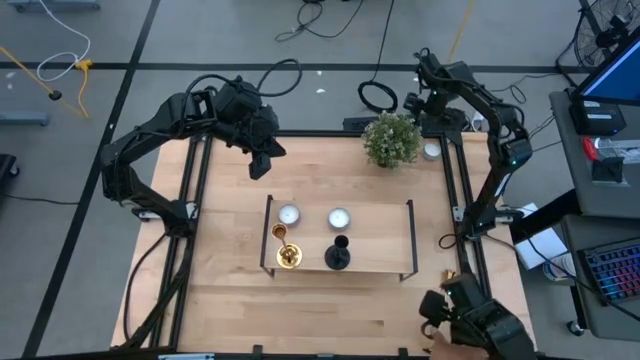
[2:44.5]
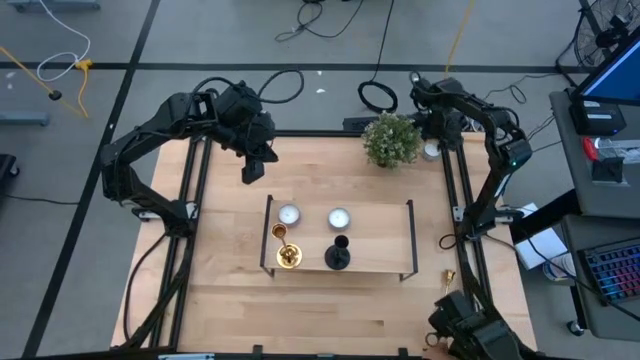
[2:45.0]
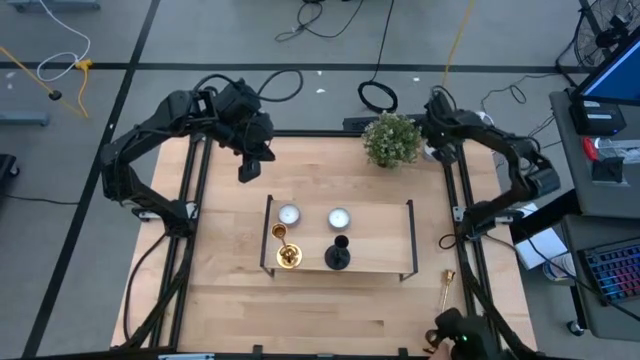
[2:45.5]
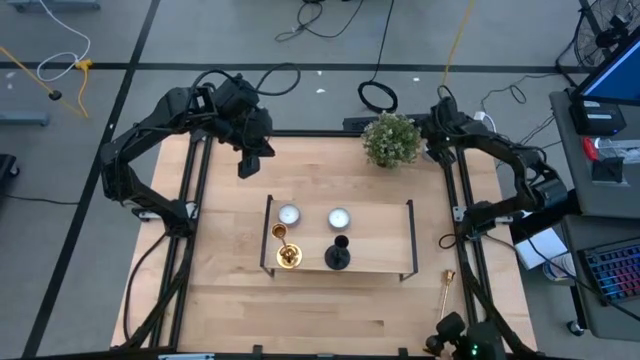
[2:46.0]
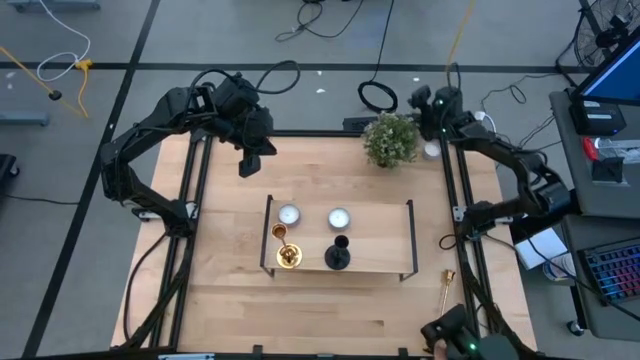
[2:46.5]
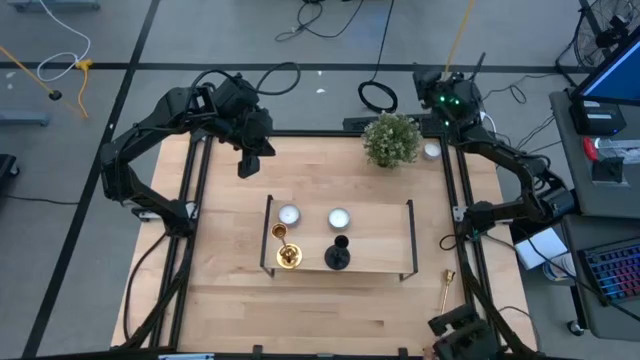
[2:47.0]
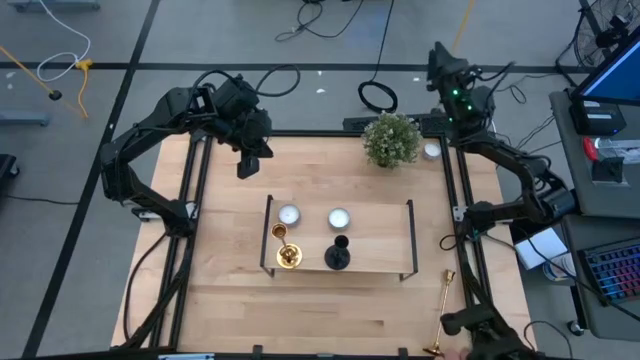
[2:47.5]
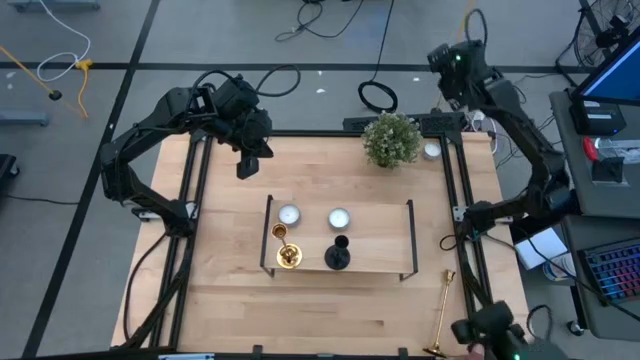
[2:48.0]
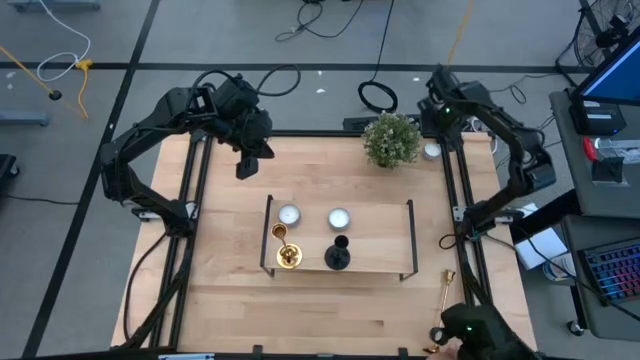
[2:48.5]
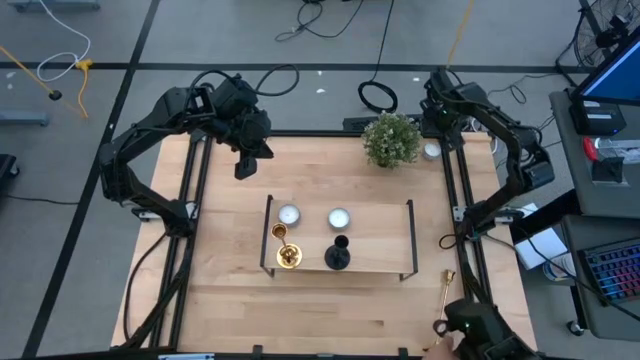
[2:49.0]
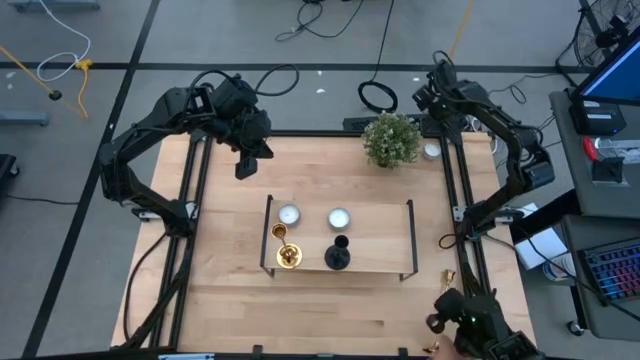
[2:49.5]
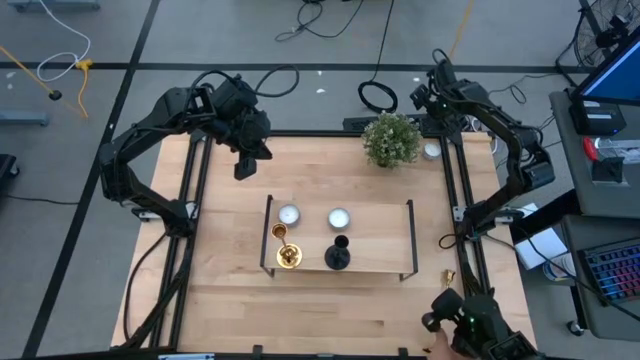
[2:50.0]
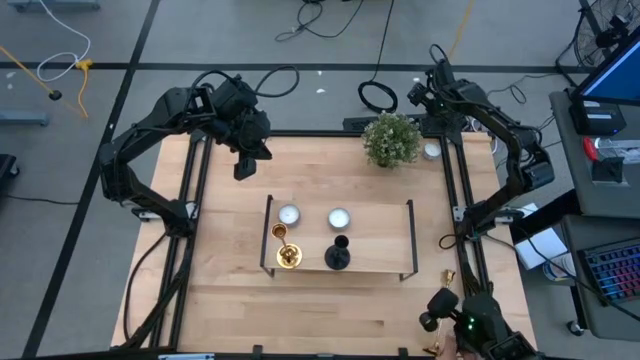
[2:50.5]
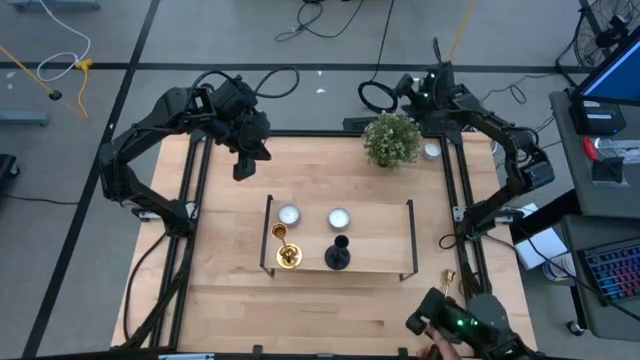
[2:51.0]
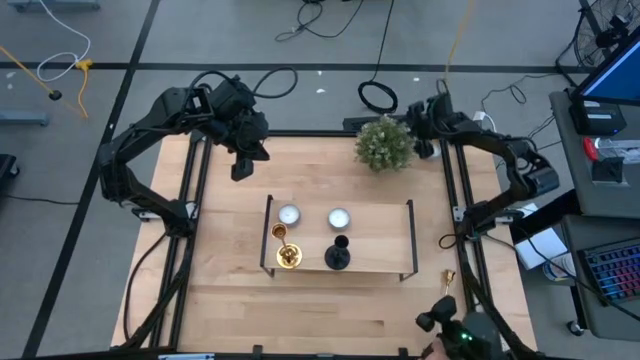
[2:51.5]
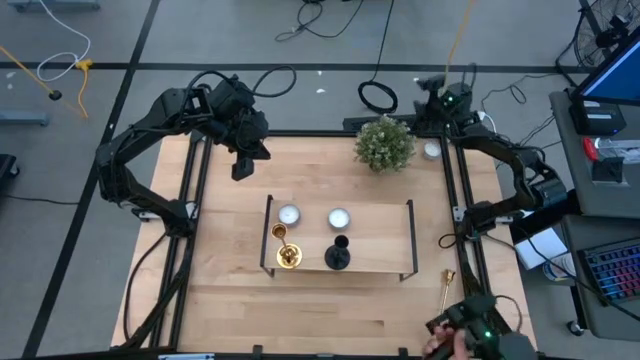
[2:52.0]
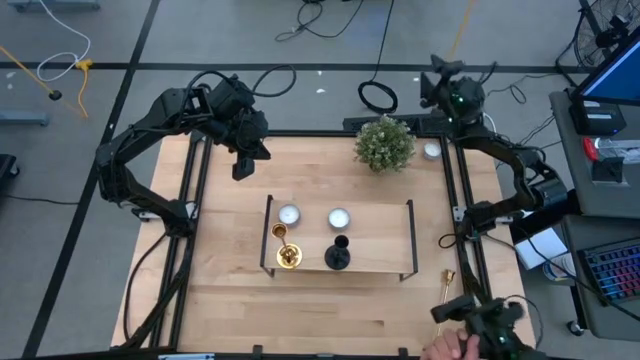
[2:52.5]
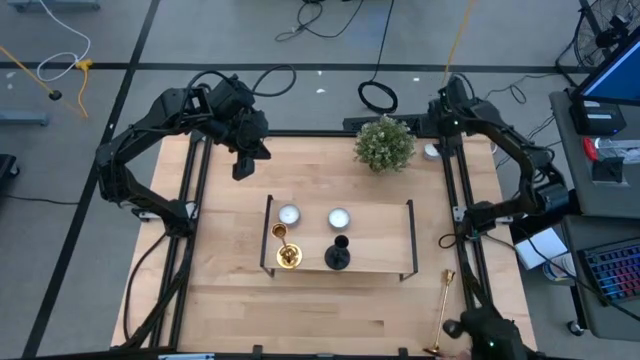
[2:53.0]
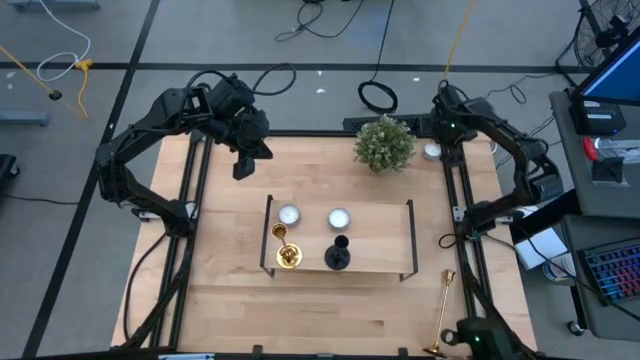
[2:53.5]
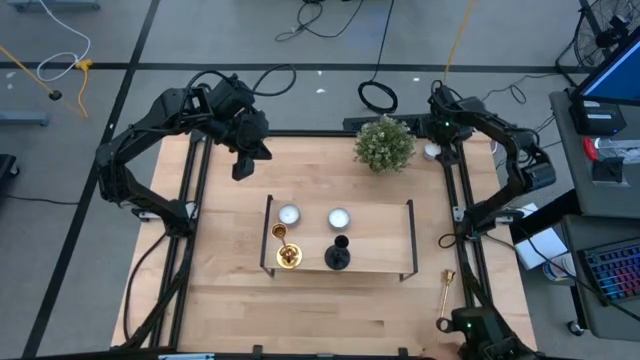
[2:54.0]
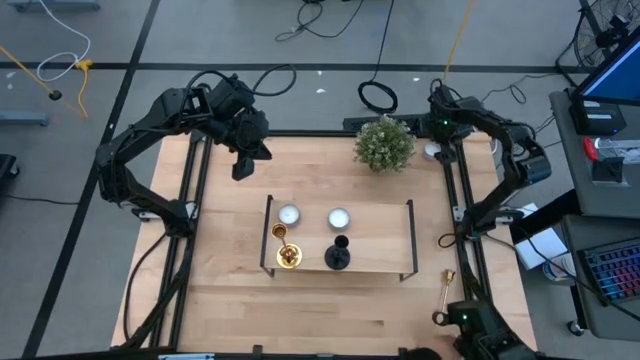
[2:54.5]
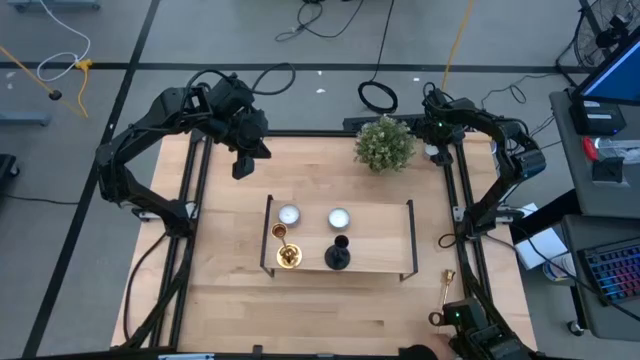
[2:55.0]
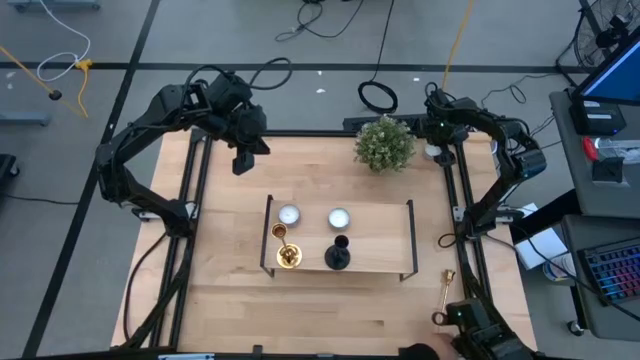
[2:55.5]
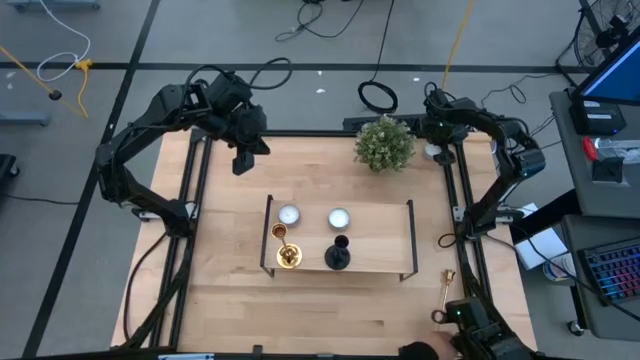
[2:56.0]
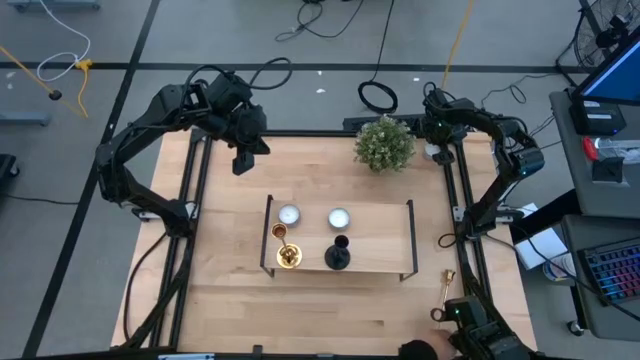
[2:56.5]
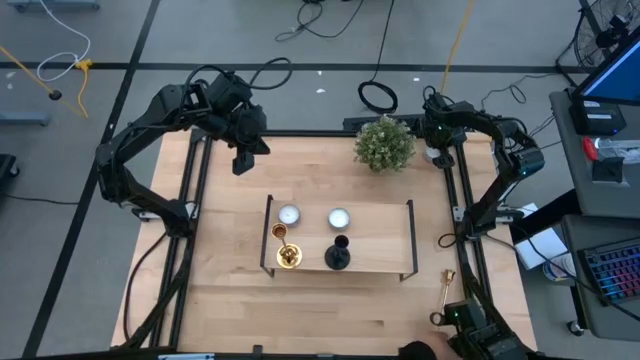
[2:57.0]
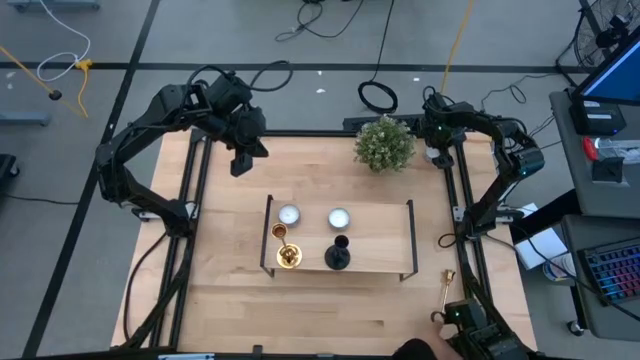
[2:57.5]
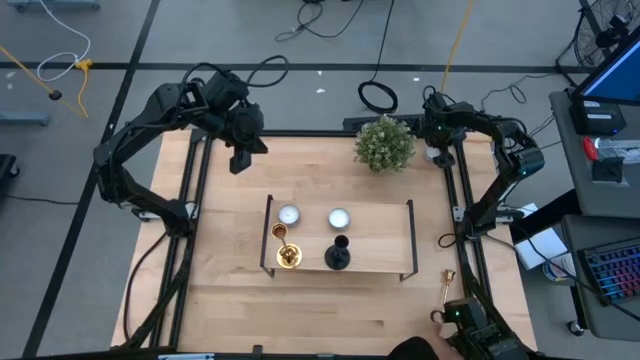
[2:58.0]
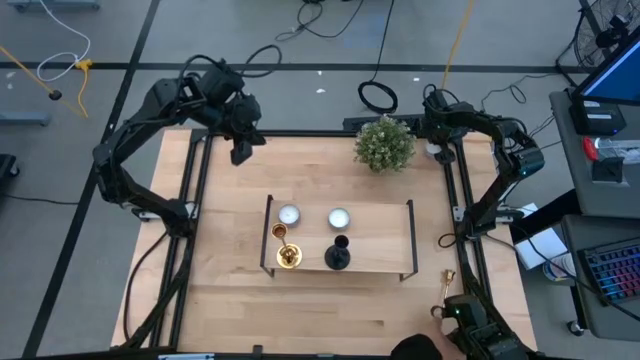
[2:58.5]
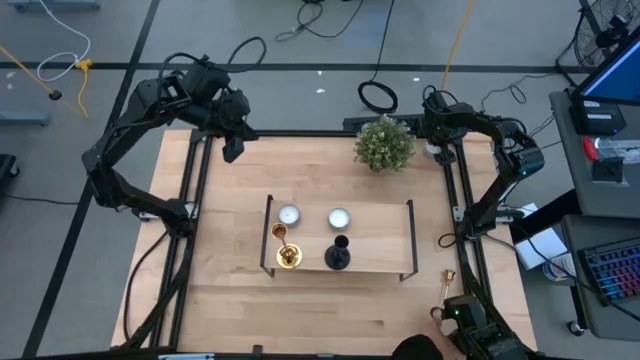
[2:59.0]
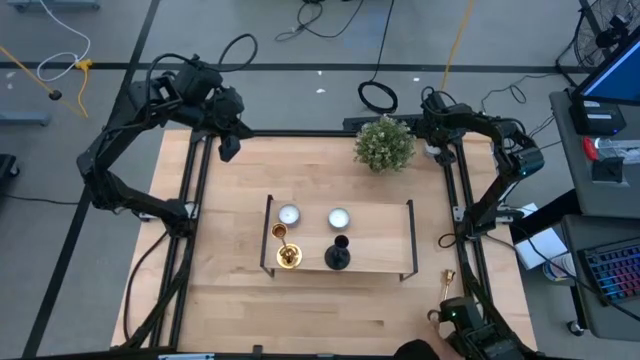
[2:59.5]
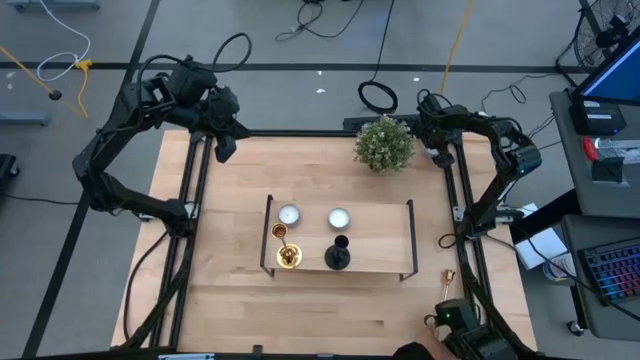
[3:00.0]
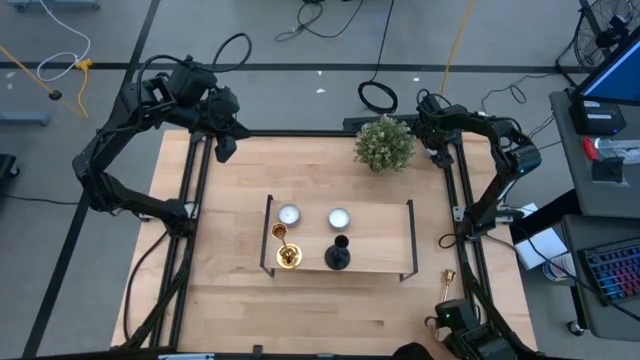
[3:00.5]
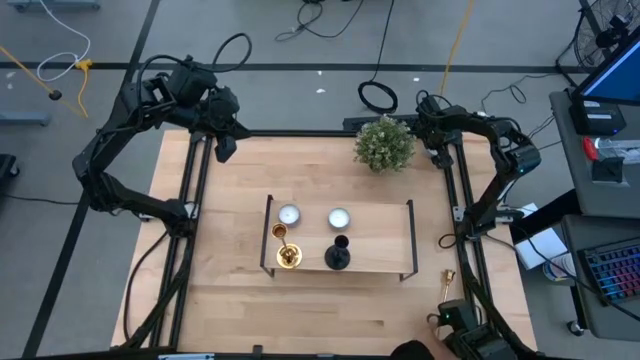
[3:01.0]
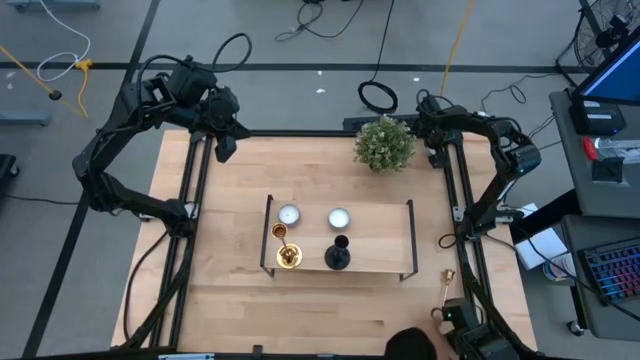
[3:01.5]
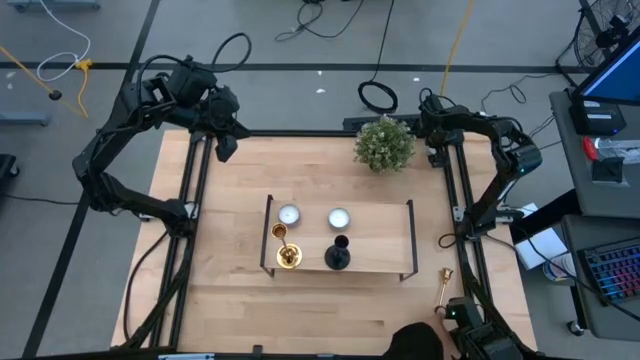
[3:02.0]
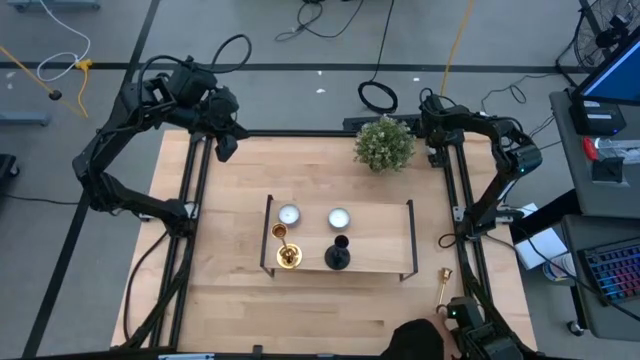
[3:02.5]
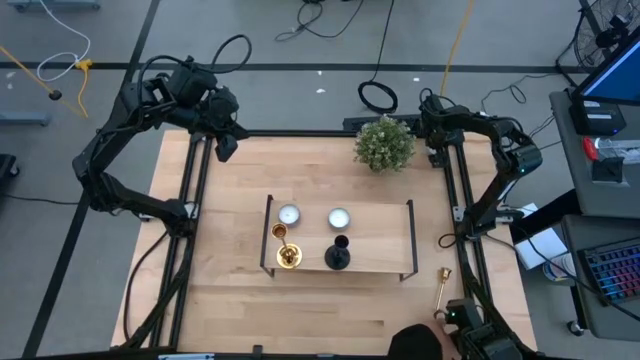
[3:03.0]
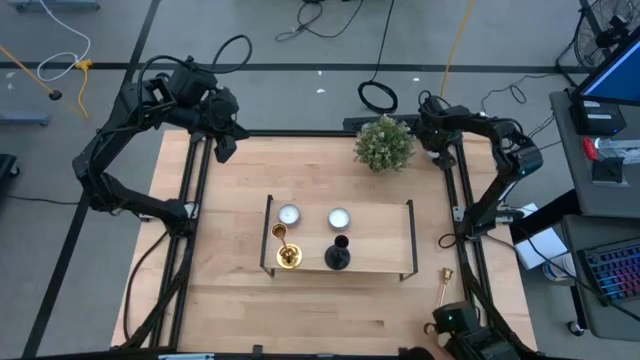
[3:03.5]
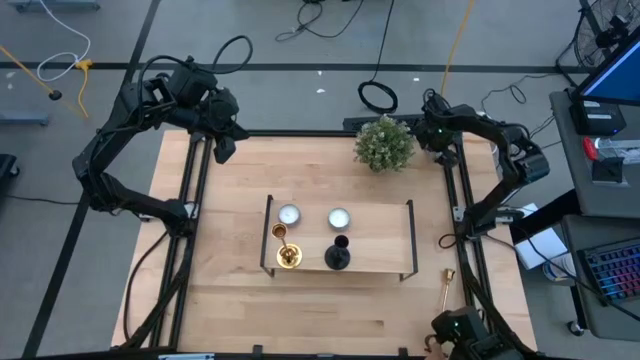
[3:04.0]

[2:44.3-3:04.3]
Task: Pick & Place candle stick holders
Put the white red scented candle on the shelf

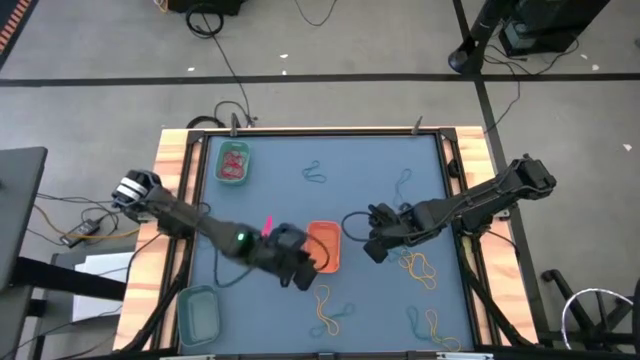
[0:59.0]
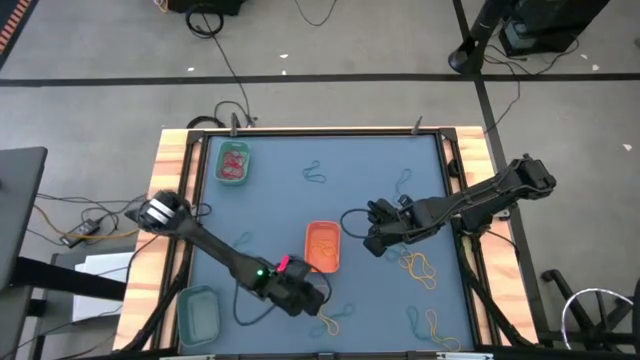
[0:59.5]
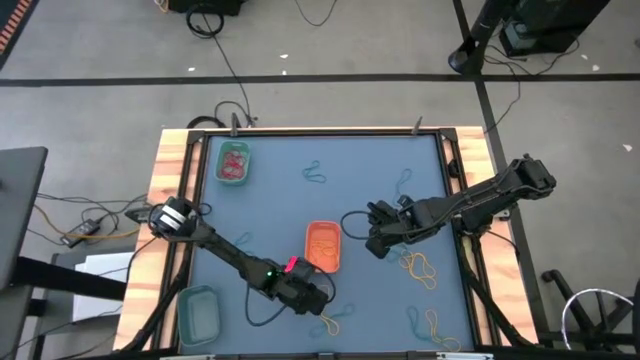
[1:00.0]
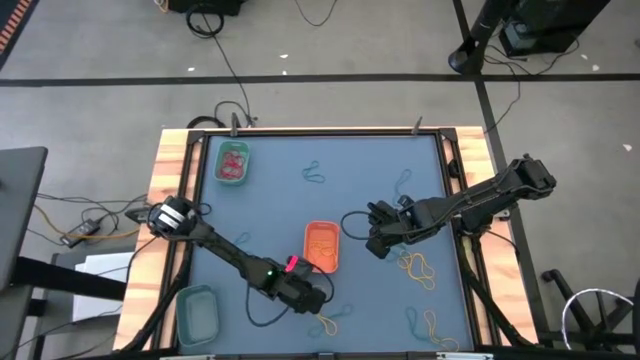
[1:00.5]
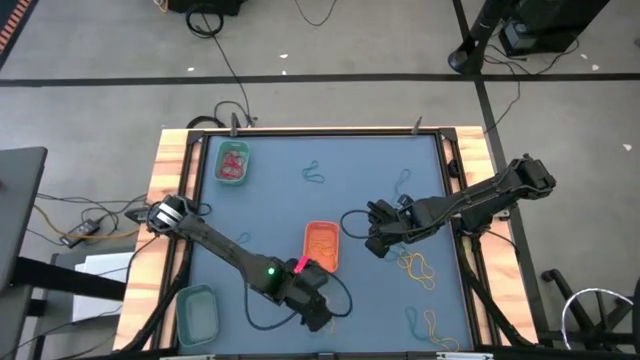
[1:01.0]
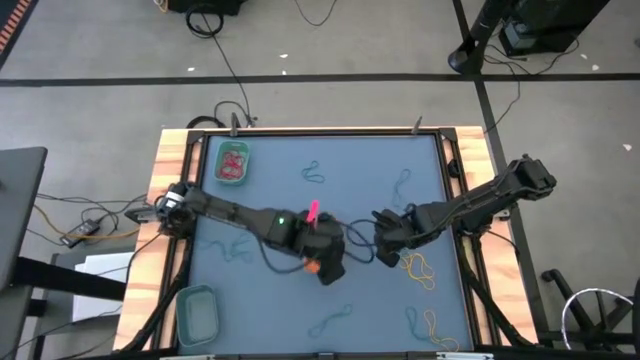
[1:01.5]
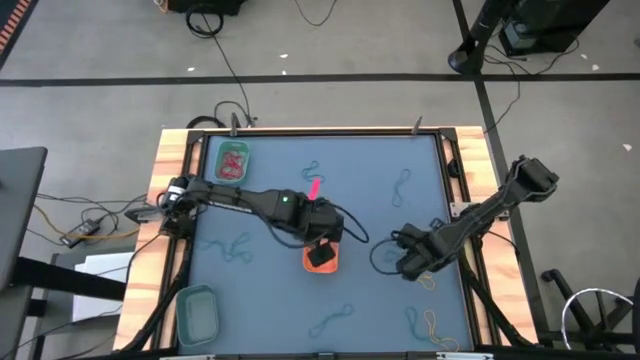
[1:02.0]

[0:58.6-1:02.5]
Task: Sort rubber bands into baskets
Put the yellow rubber band into the orange bin
